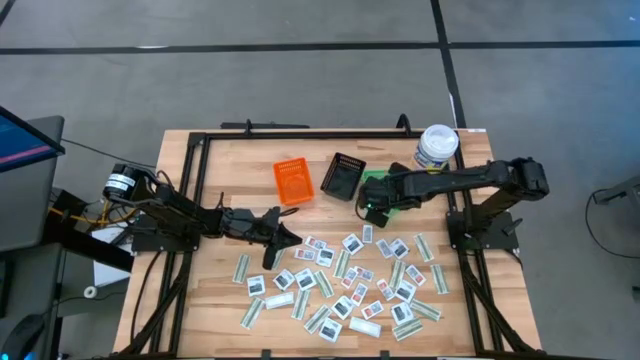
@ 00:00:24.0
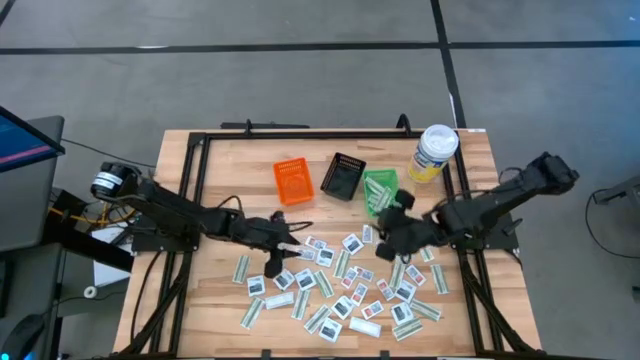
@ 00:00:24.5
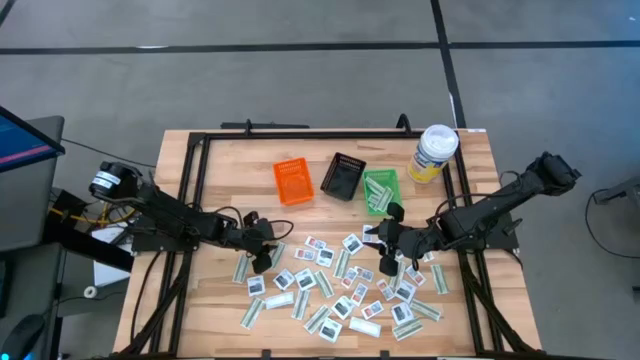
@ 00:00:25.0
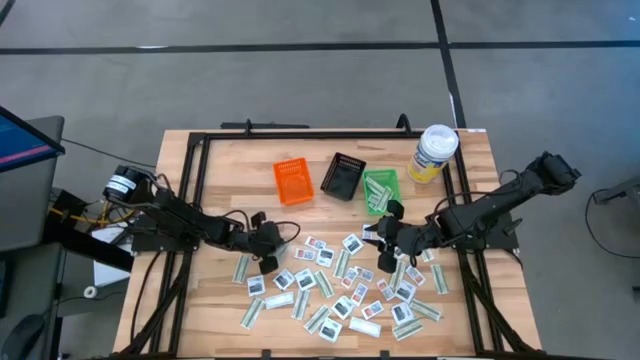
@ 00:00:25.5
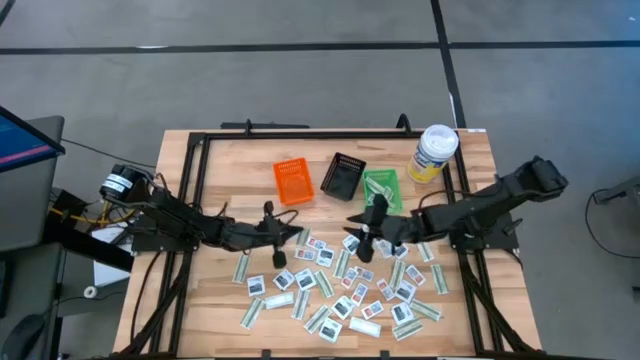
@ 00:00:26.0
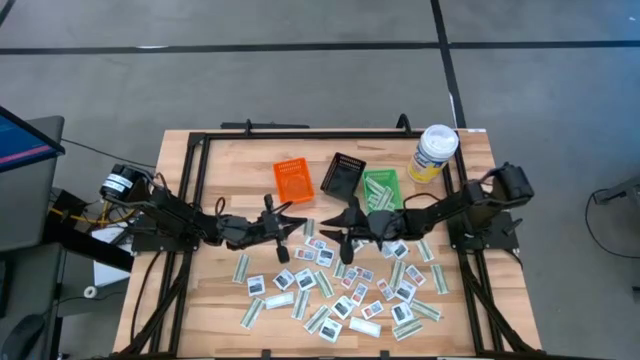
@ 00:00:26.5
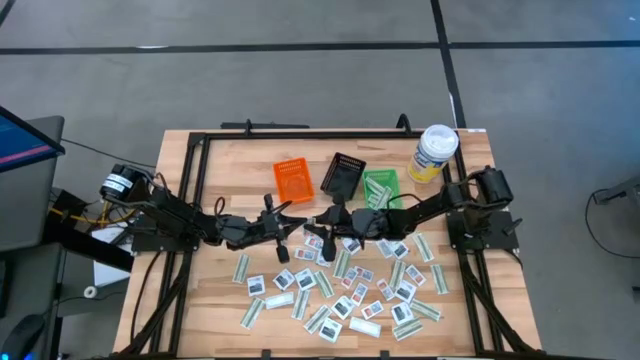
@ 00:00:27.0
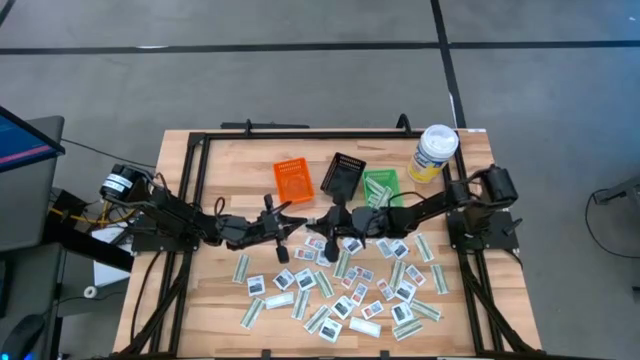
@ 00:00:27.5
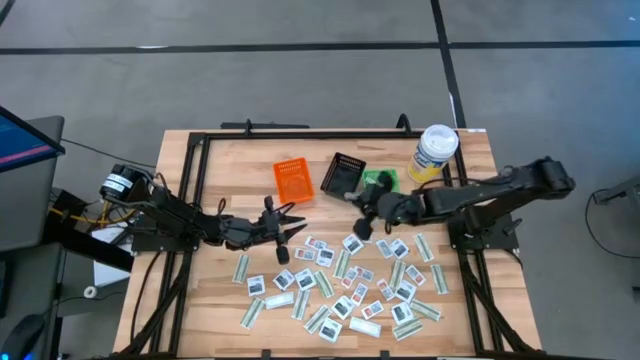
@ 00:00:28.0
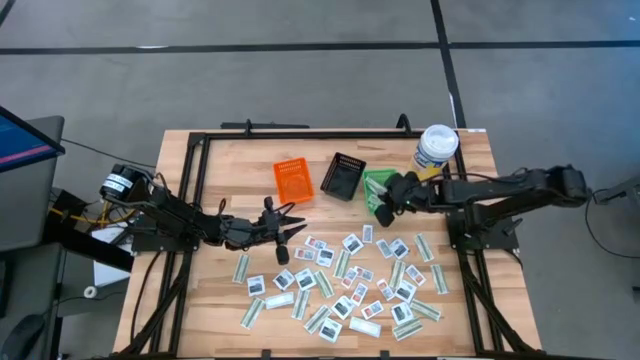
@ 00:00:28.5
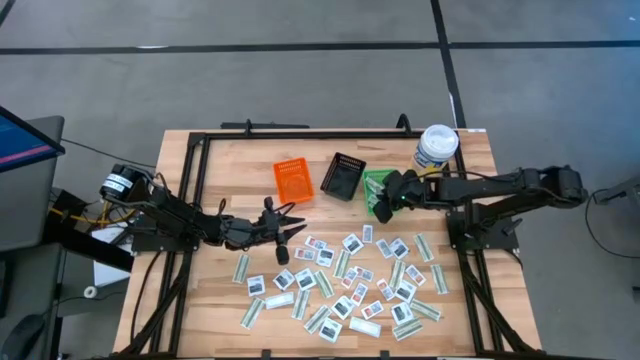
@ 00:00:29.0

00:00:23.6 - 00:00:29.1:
Task: Pick & Place First Aid Supplies
Put the green bandage pack into the green basket

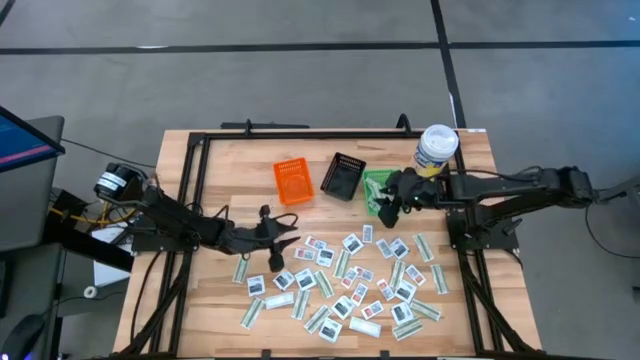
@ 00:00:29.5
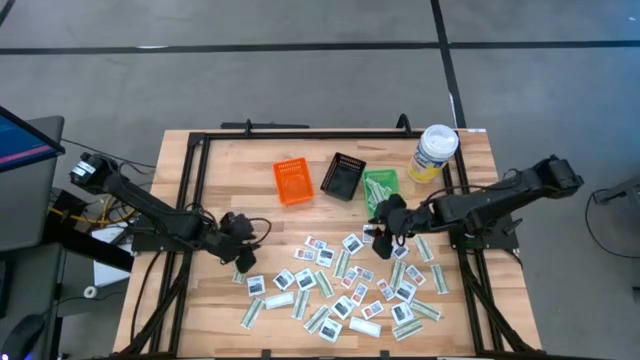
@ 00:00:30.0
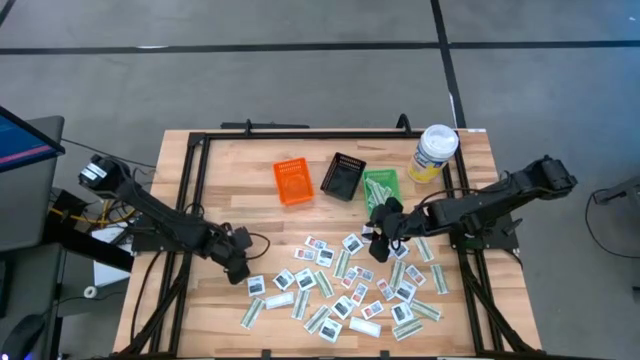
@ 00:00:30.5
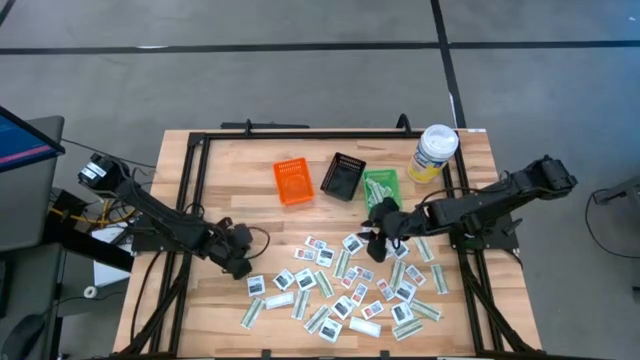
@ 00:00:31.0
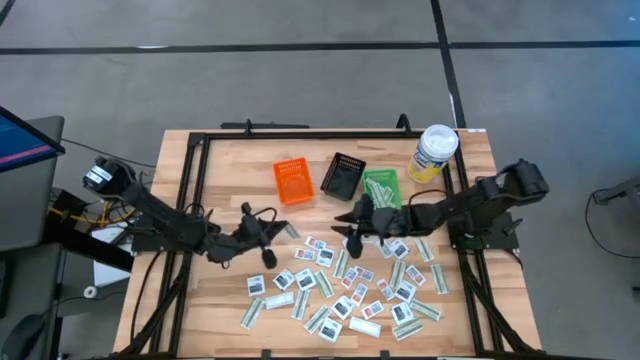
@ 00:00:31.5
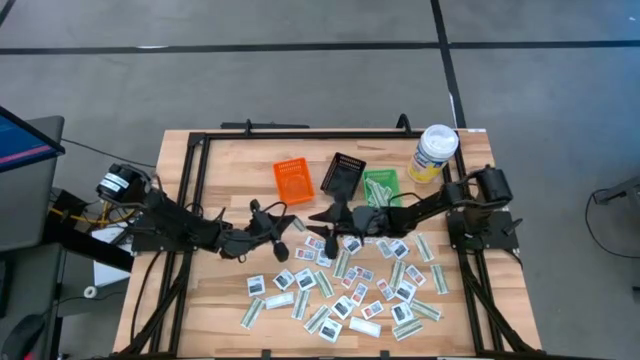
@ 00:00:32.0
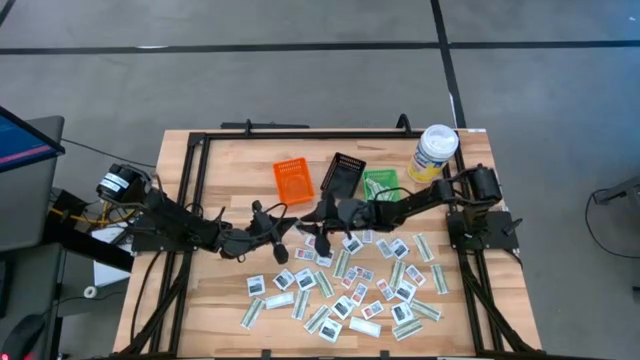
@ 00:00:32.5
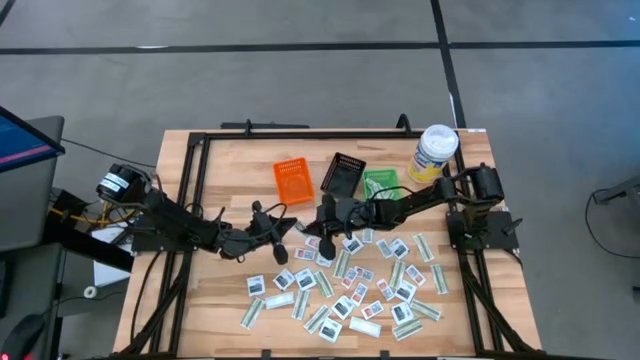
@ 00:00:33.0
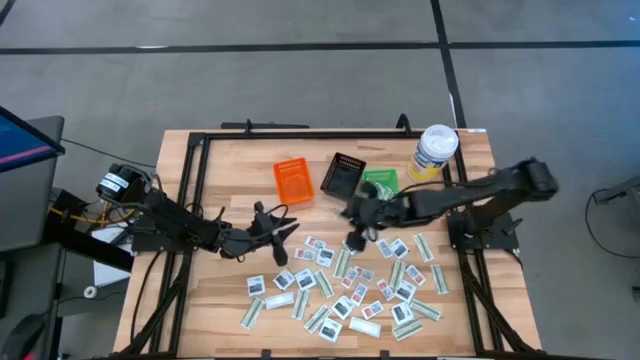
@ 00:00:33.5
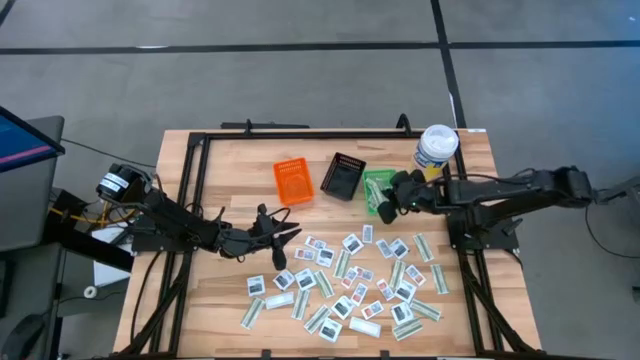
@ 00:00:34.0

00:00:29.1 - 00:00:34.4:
Put the green bandage pack into the green basket

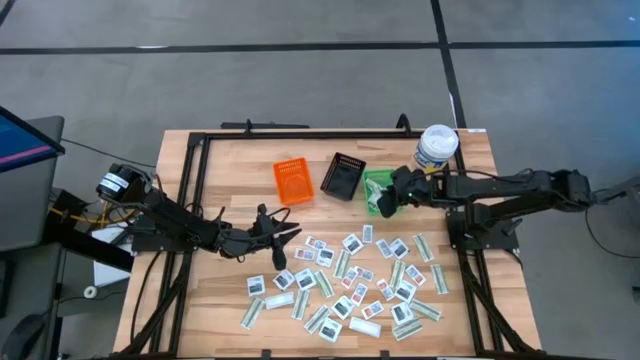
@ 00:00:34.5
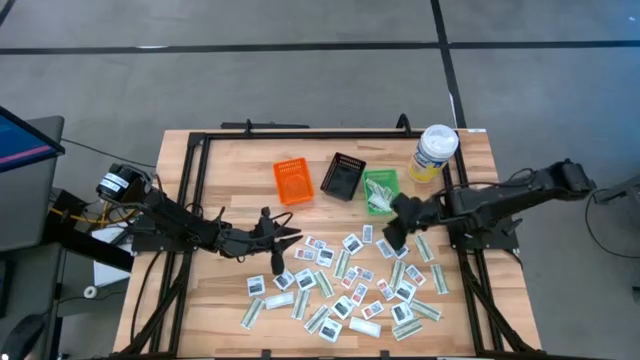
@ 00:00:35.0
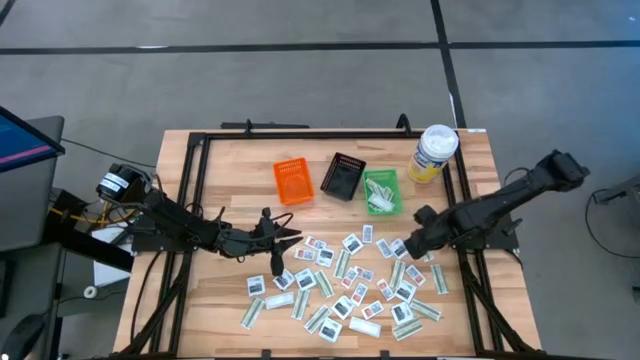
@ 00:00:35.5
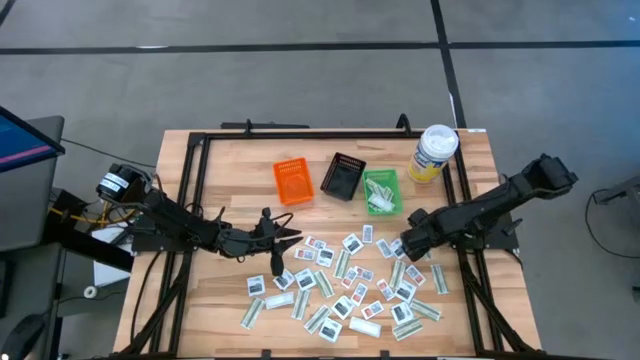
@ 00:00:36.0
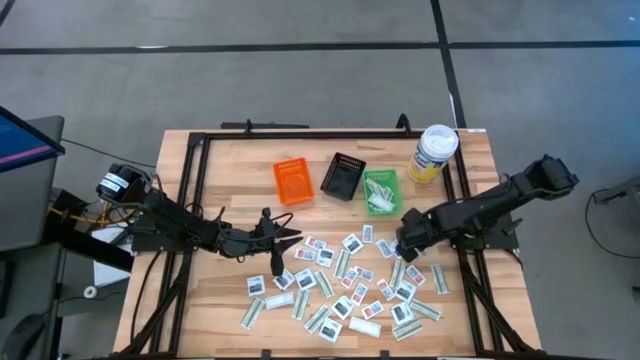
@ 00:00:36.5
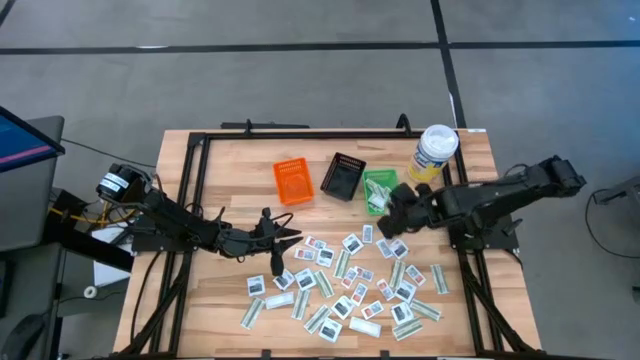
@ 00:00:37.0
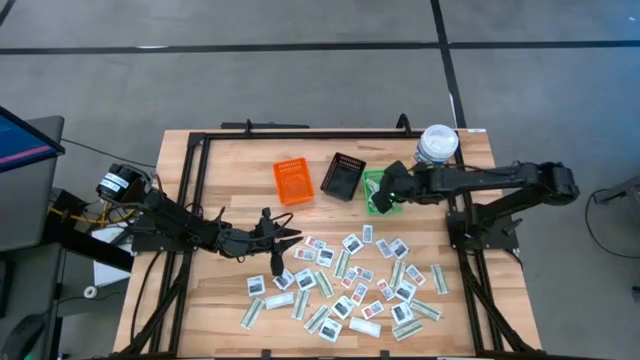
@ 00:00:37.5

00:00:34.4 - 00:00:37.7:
Put the green bandage pack into the green basket

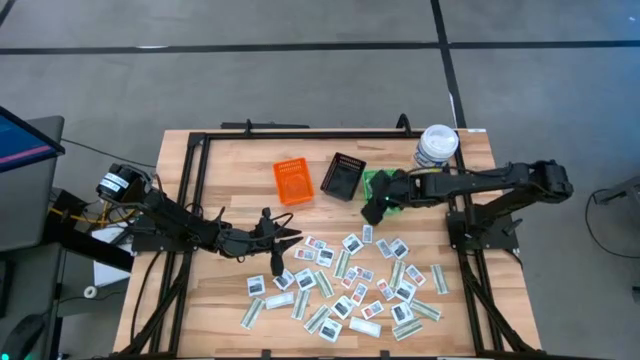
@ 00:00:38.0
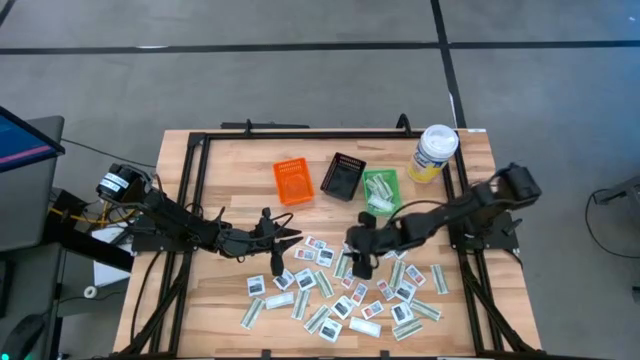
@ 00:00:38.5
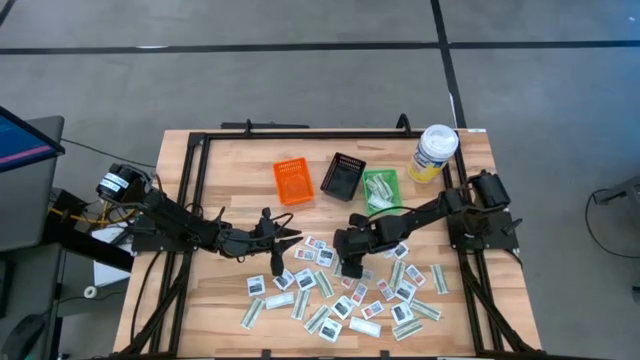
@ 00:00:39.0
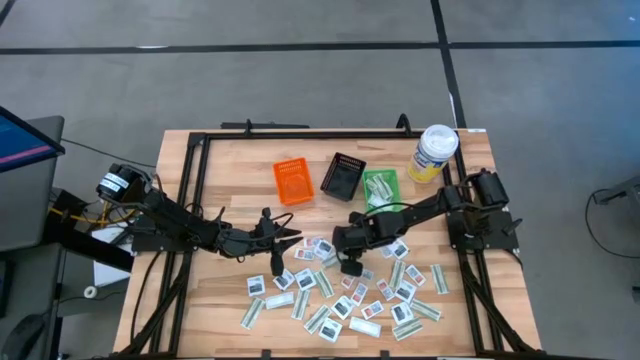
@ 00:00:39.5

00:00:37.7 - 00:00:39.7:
Put the green bandage pack into the green basket

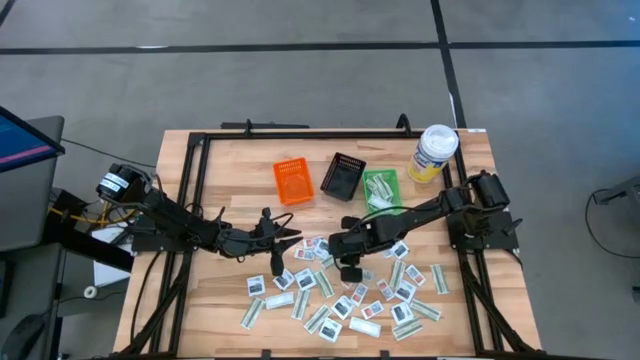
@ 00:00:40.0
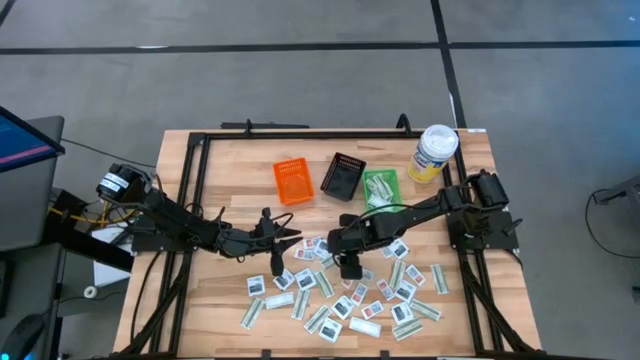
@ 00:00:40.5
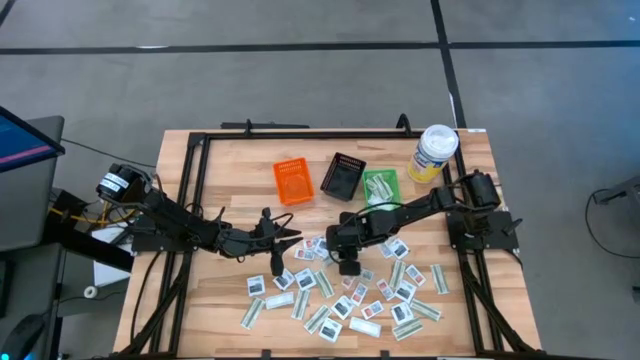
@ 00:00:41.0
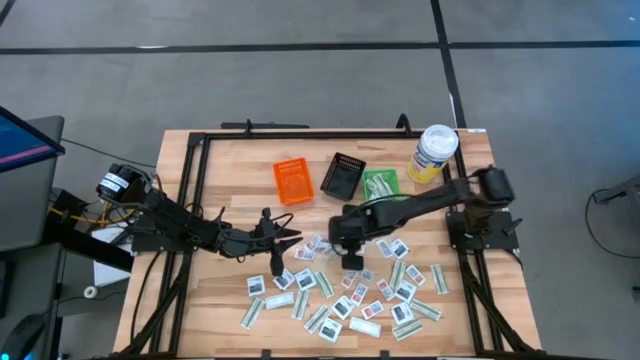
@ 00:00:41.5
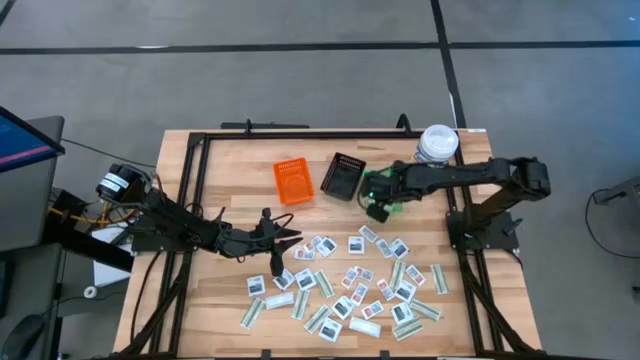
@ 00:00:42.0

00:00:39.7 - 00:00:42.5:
Put the green bandage pack into the green basket

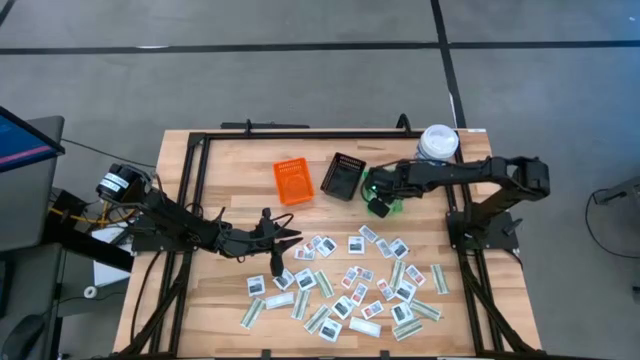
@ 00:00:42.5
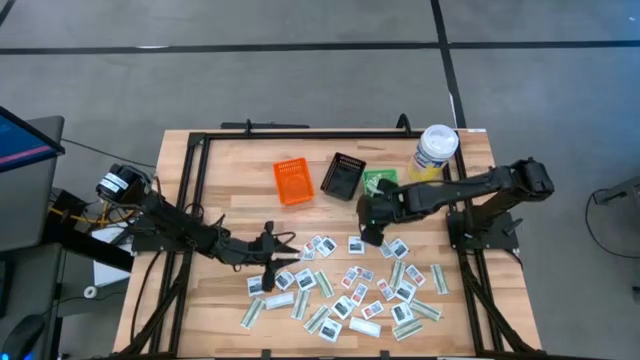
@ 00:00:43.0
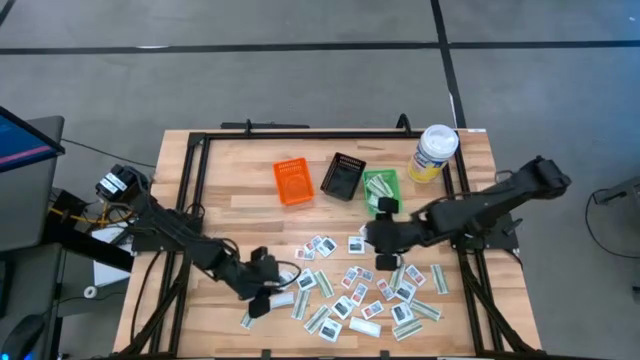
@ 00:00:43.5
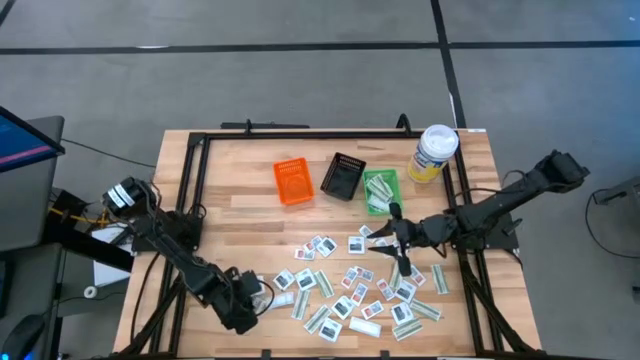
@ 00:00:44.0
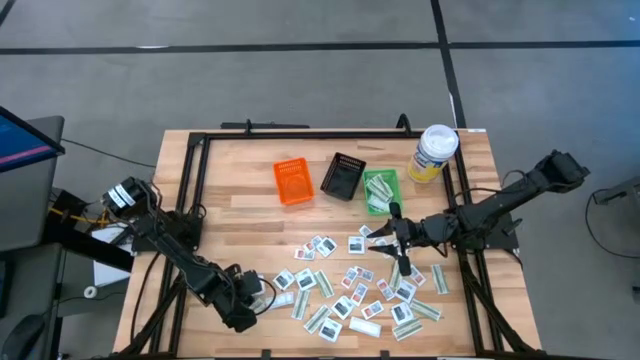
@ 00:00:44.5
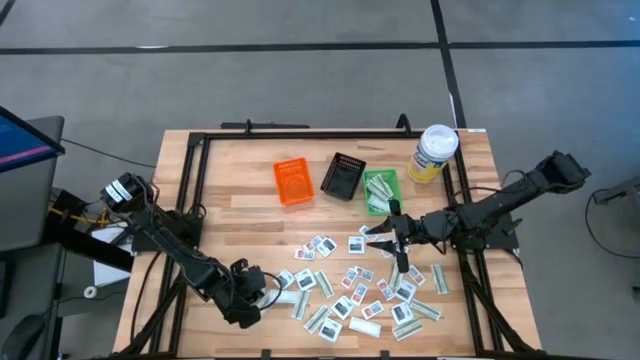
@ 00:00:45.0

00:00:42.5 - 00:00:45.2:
Put the green bandage pack into the green basket
